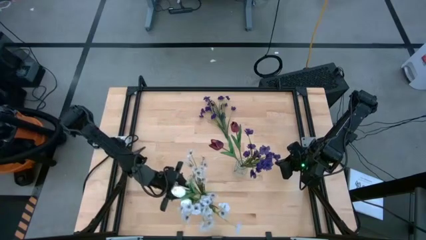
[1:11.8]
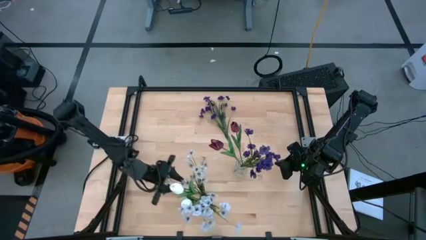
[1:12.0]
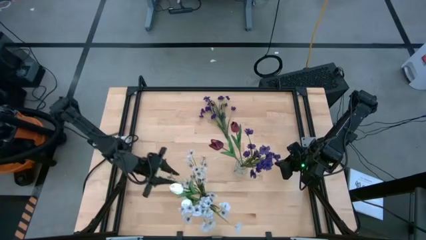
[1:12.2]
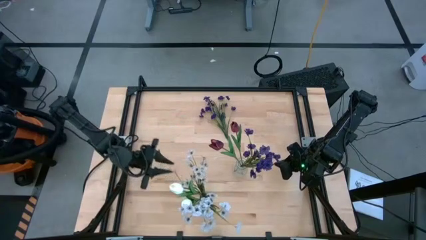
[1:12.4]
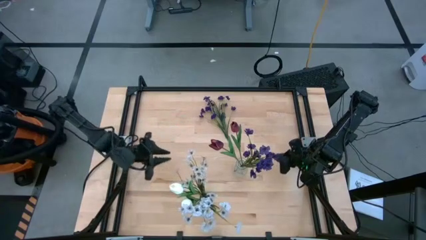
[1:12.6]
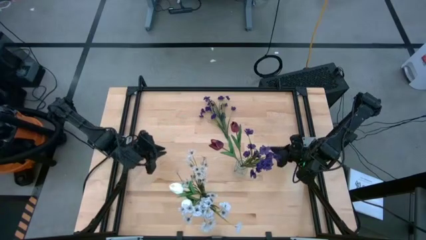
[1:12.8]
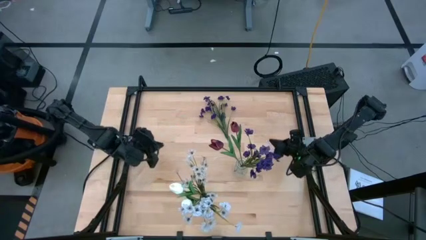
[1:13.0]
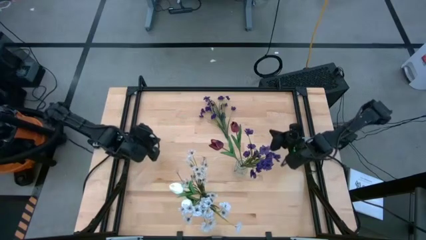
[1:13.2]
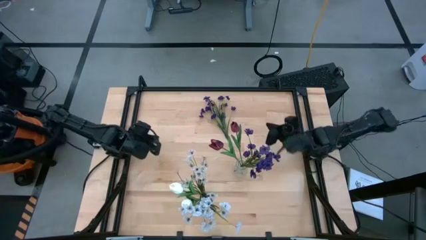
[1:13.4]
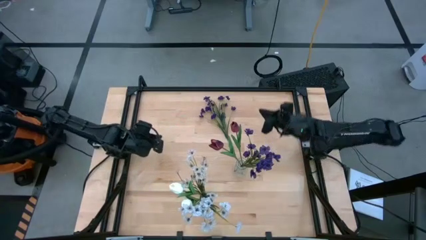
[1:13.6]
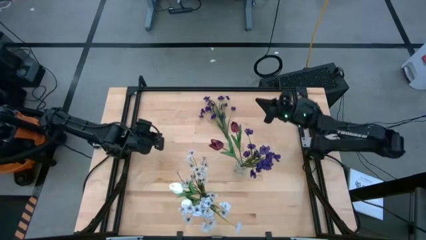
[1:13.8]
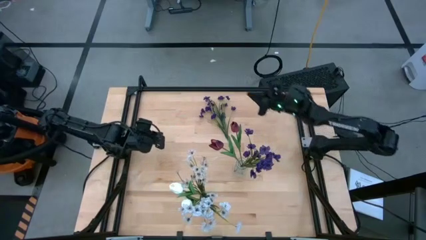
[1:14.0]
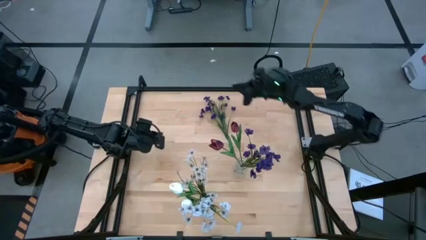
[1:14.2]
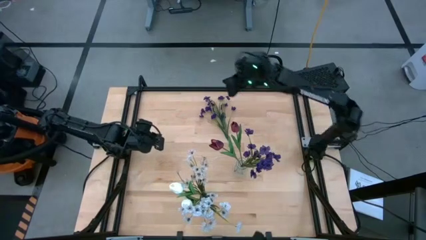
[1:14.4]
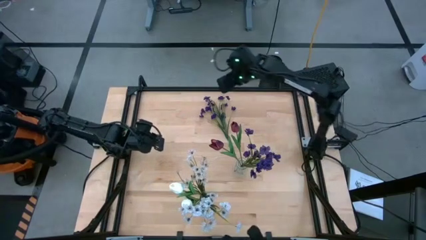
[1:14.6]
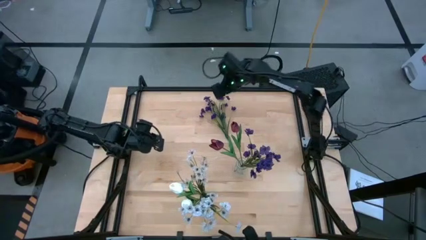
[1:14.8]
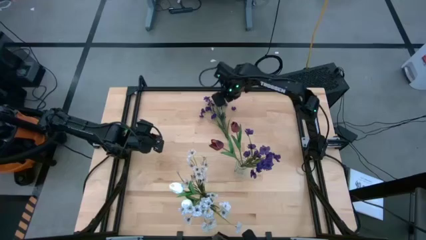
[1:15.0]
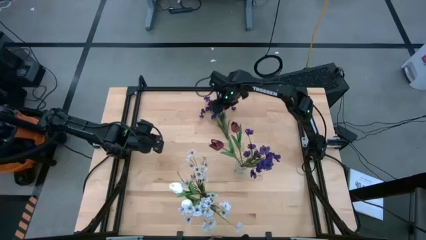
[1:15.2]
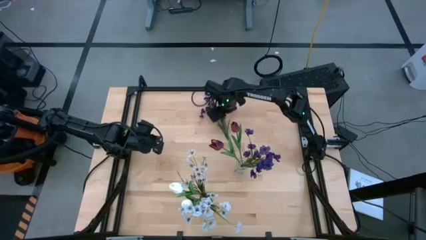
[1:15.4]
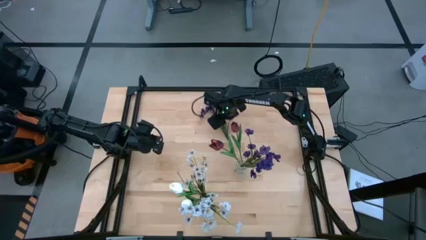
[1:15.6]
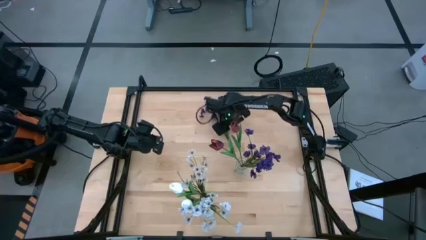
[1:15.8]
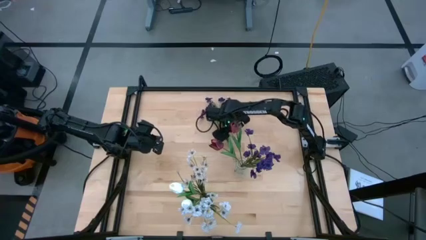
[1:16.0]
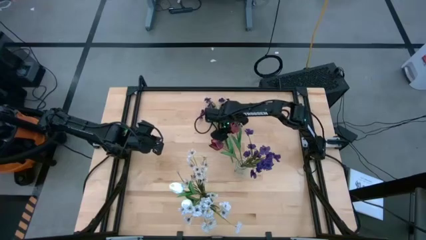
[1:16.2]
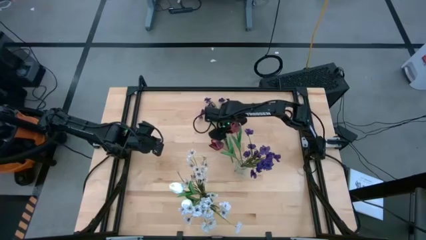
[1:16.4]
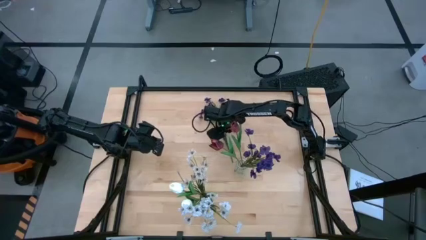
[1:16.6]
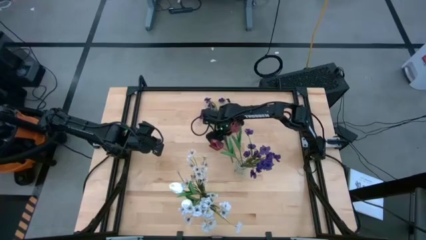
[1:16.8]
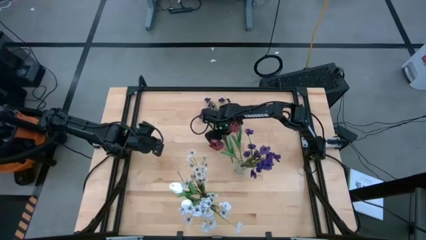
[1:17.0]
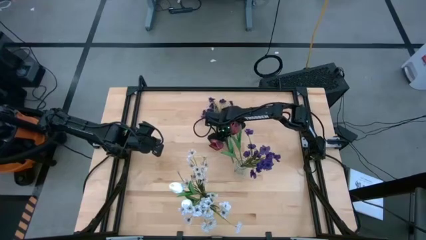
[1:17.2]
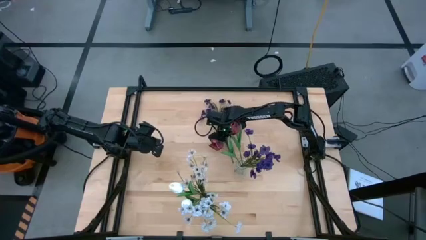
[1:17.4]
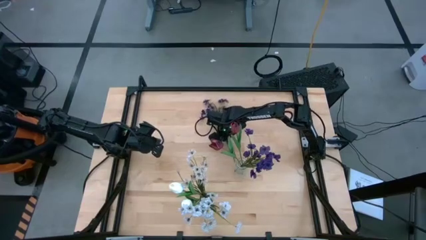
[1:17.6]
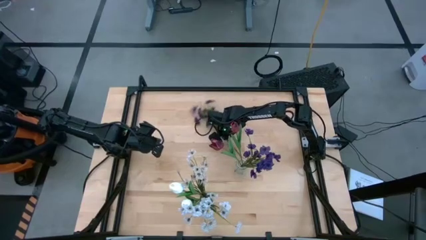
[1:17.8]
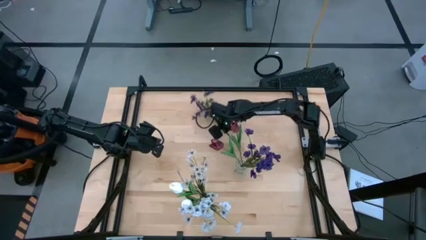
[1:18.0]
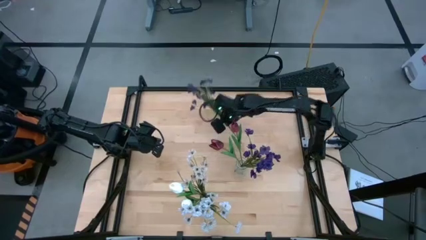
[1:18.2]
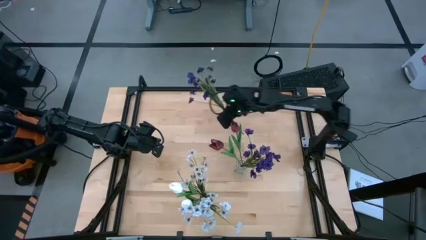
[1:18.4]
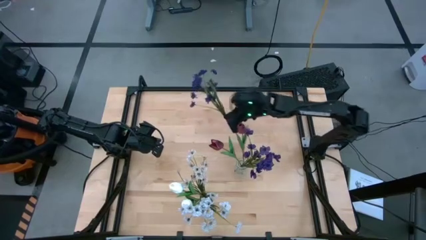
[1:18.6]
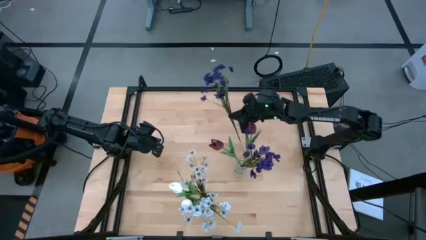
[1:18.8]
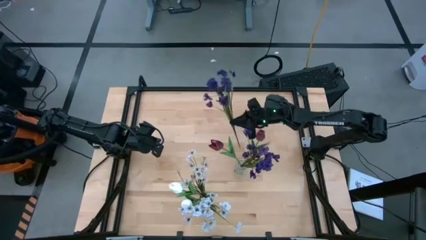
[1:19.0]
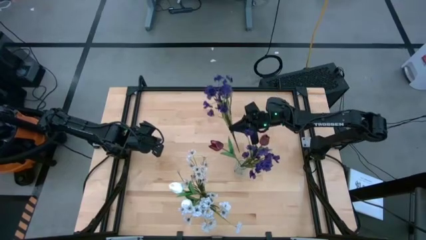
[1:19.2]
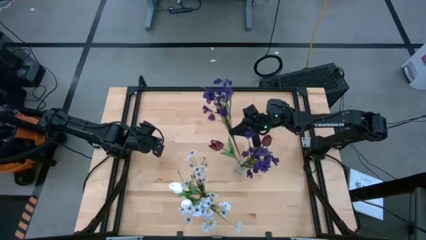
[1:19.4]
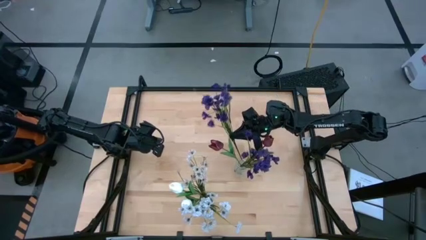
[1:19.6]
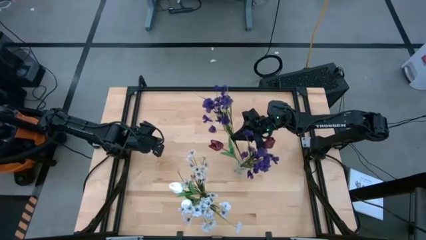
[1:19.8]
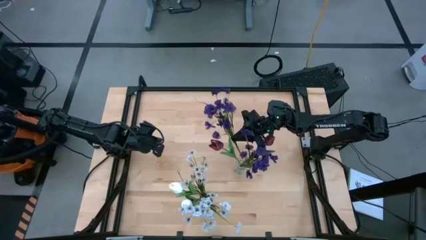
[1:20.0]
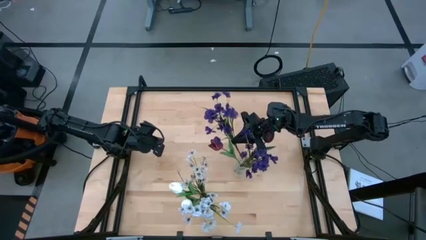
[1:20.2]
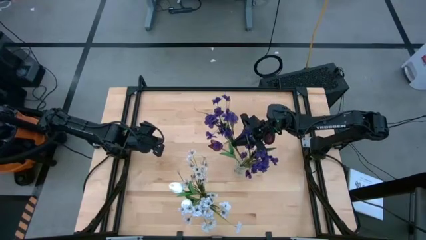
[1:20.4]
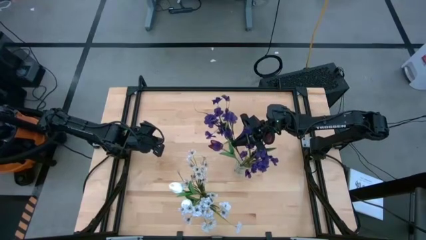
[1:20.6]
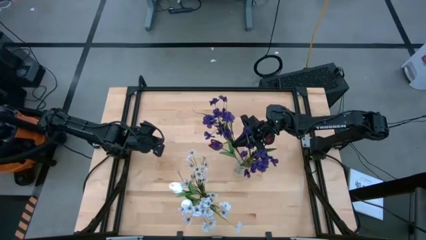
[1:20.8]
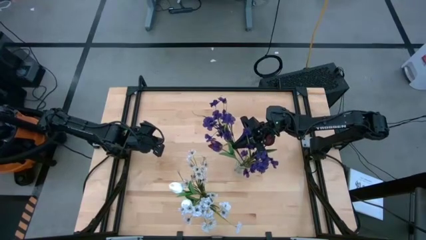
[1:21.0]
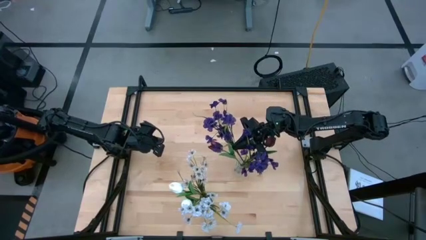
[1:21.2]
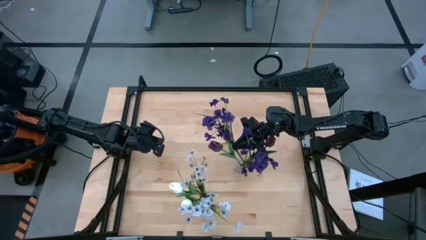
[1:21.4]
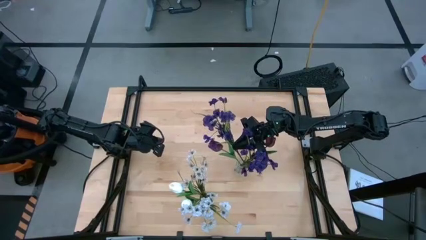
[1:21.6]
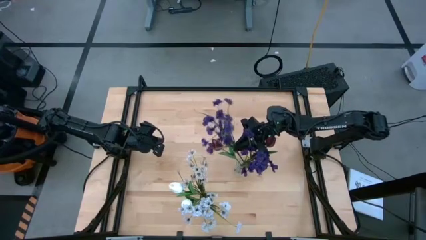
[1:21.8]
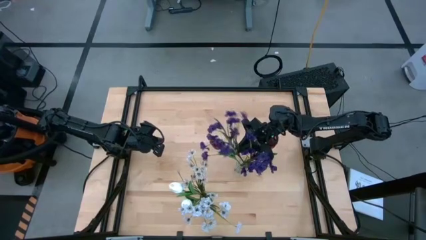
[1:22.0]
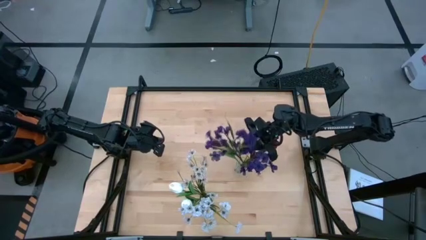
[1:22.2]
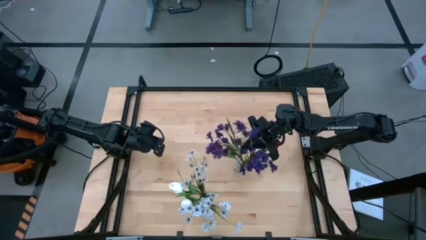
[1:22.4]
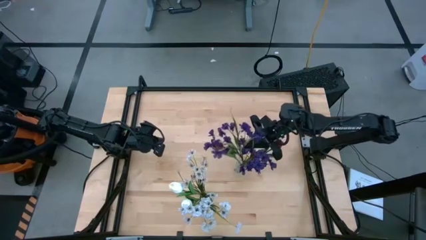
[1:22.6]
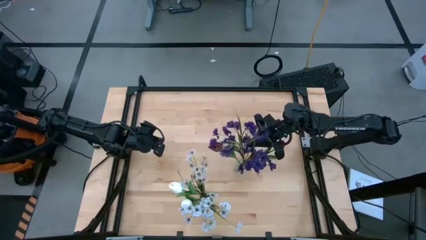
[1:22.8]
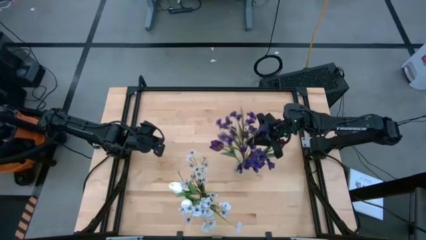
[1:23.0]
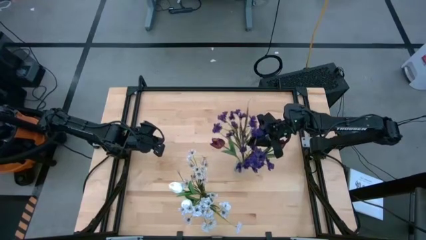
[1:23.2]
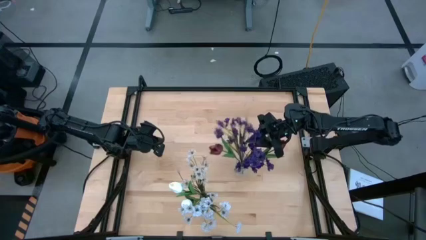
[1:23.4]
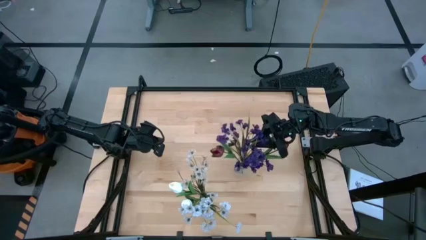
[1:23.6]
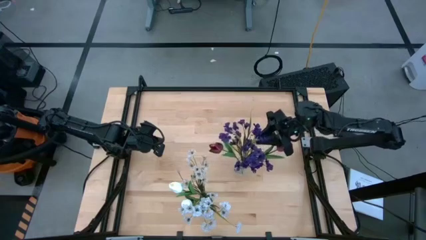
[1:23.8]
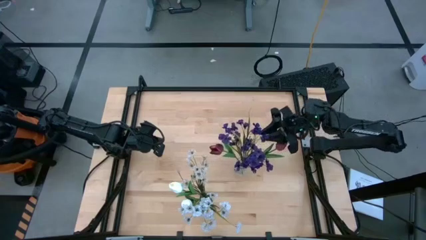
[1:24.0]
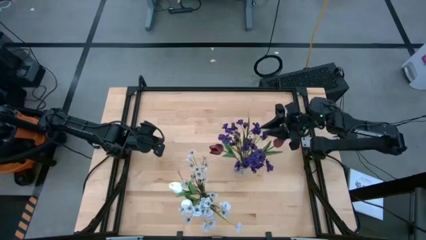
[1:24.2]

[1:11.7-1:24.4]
Task: Sort flowers into vase by color
Put the violet flowers into the transparent vase
